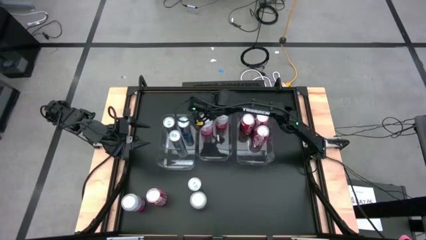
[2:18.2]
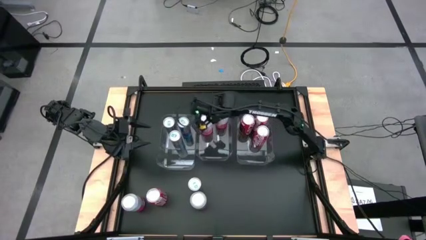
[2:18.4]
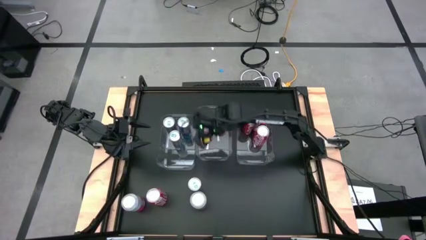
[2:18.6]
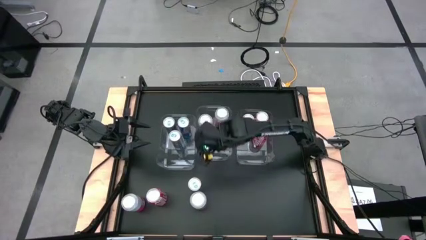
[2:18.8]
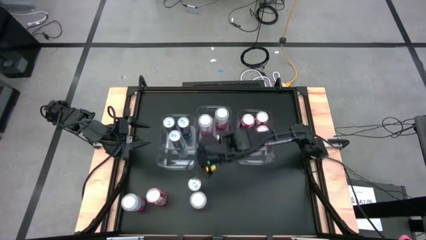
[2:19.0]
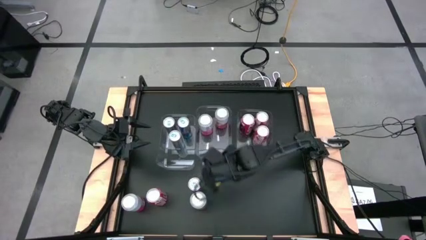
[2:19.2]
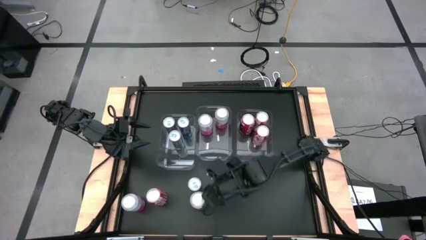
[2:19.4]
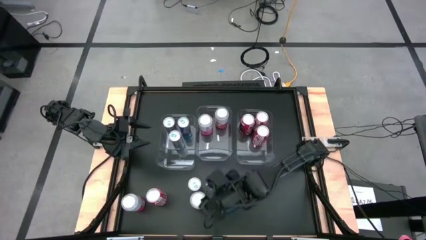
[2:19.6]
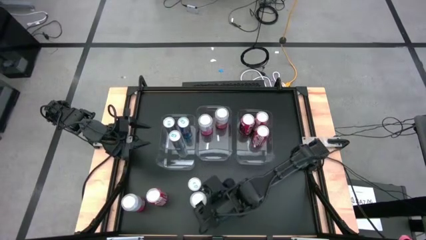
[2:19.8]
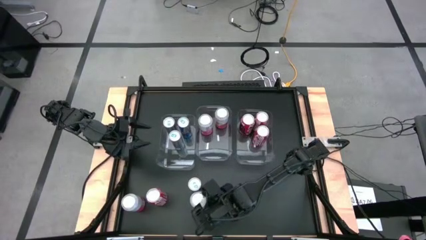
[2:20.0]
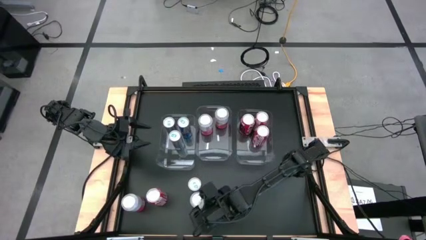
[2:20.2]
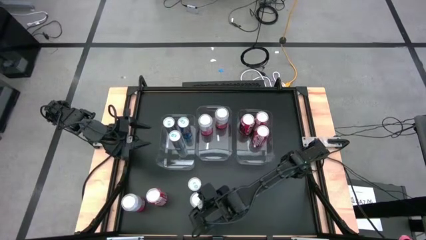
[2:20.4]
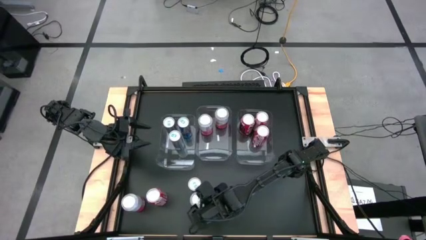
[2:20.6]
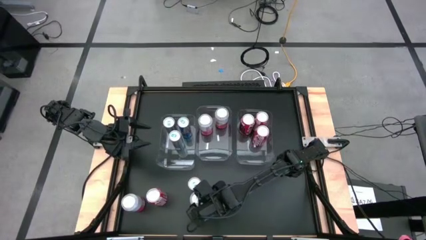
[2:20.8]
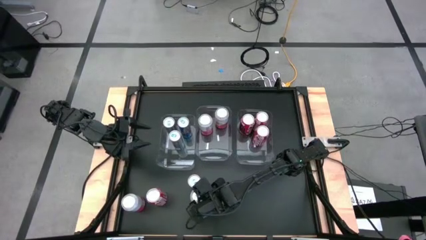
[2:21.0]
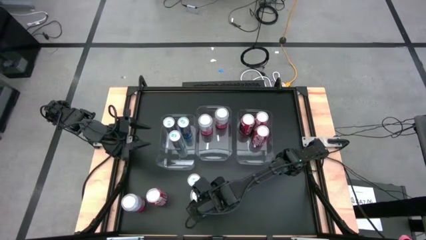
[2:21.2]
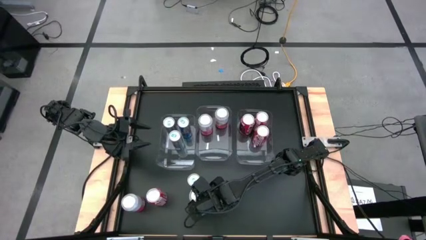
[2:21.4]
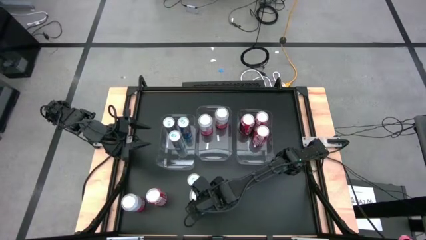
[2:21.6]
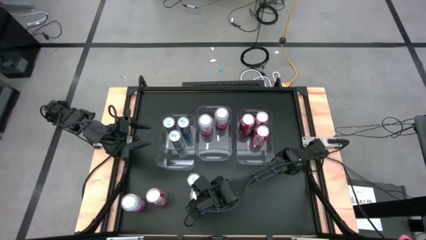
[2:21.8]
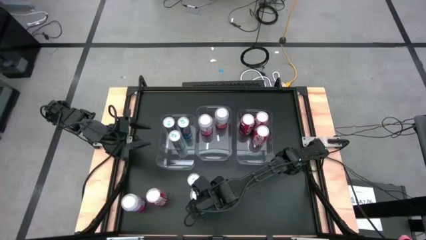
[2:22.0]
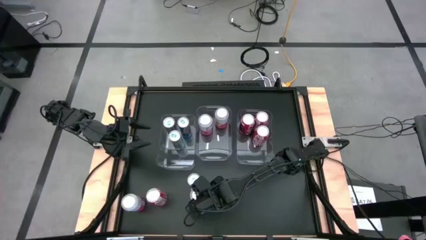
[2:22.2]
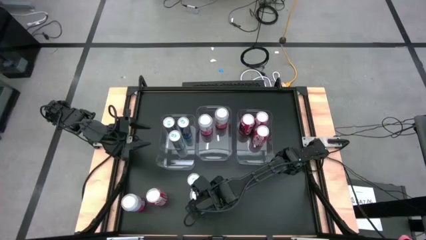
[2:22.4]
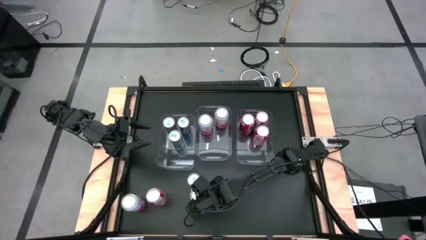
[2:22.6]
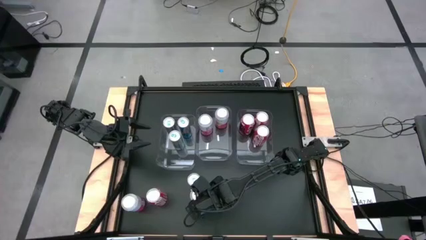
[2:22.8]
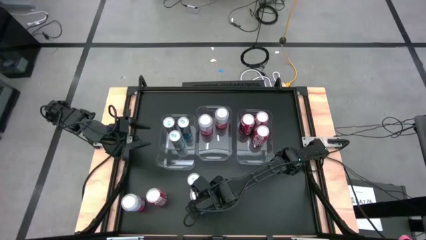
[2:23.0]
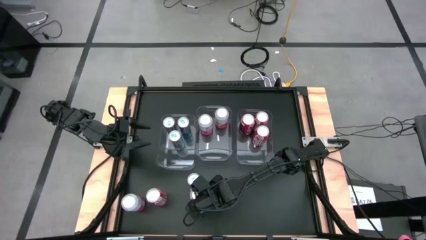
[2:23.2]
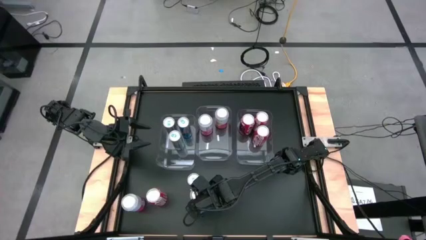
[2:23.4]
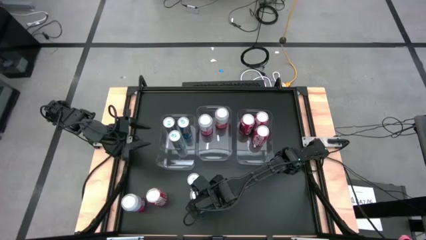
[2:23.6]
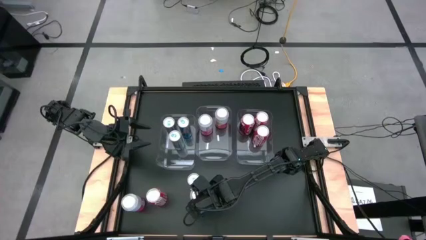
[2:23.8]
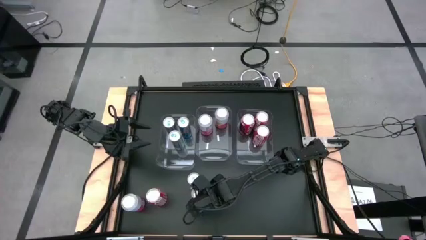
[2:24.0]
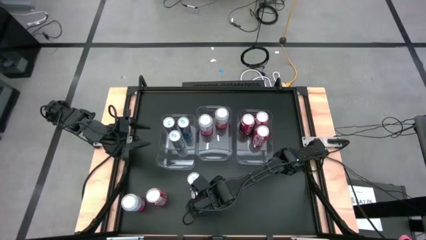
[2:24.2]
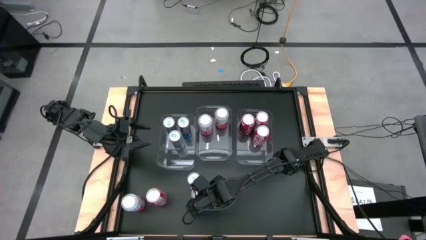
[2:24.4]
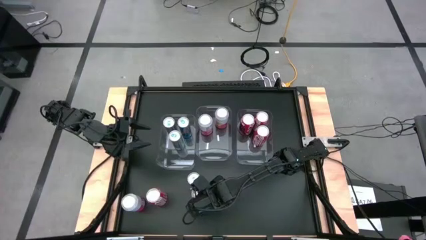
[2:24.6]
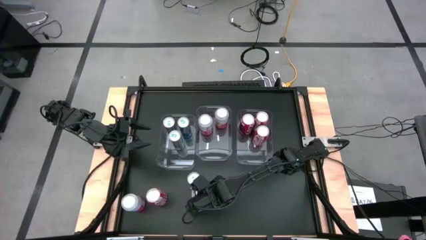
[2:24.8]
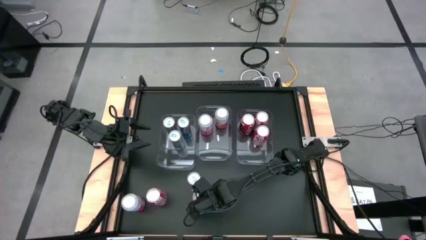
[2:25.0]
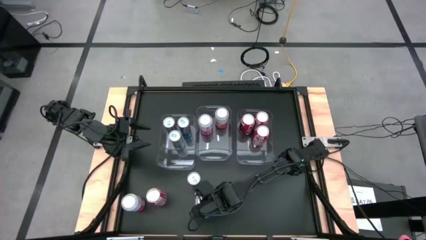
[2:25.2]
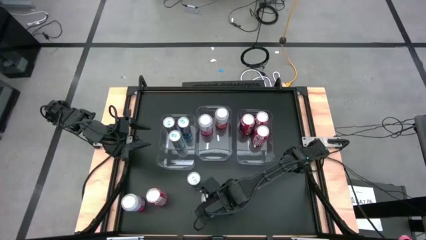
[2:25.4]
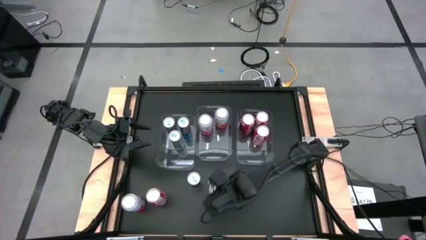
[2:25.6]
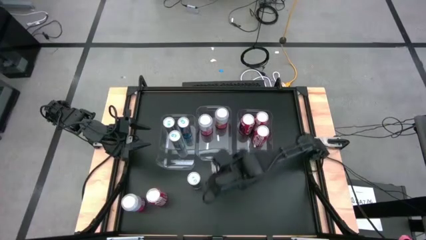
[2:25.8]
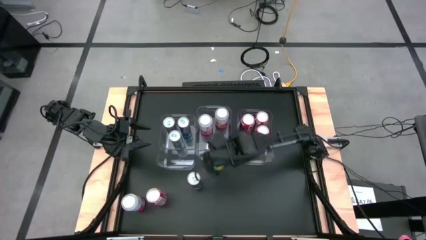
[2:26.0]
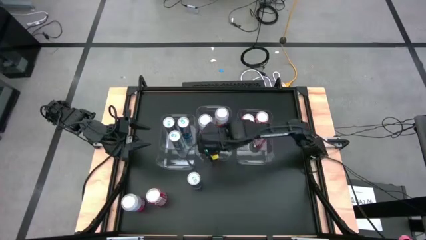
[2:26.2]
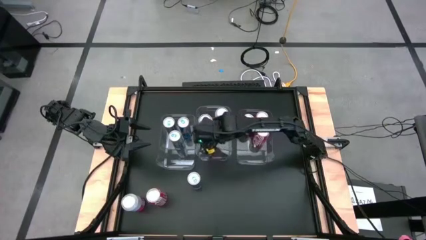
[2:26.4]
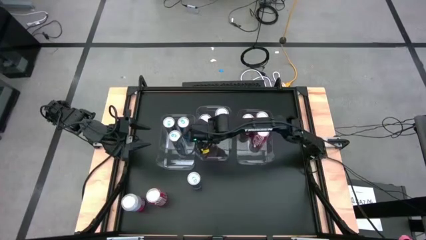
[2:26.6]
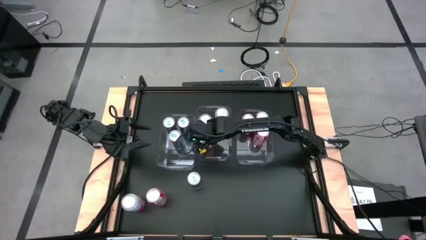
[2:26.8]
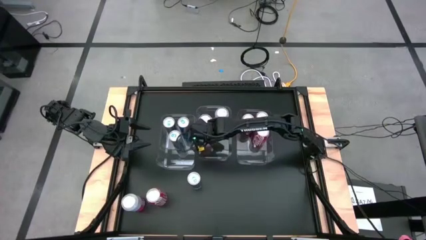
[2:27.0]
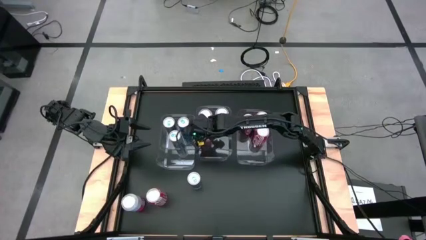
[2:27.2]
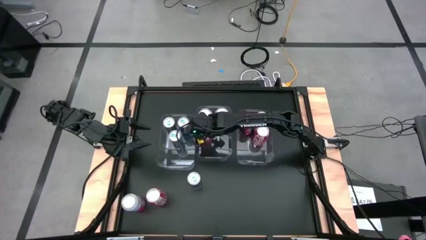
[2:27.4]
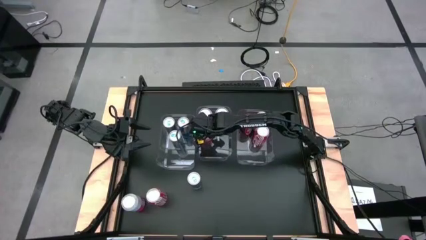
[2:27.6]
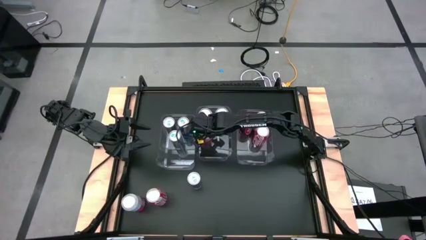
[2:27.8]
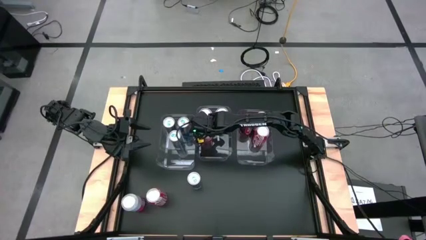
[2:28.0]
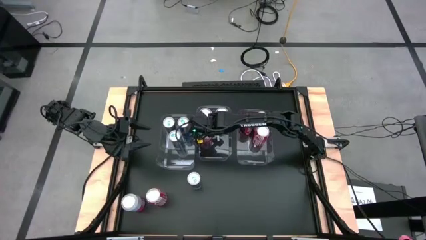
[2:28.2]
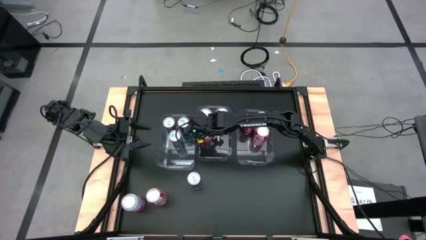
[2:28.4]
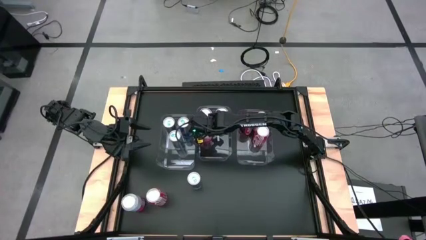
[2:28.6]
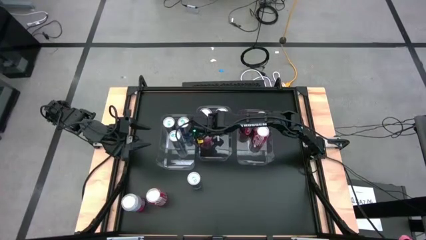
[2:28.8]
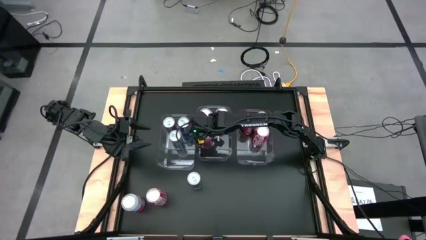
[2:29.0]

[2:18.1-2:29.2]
Task: Sort soda cans
Put the bottom center red and white soda can into the middle transparent bin

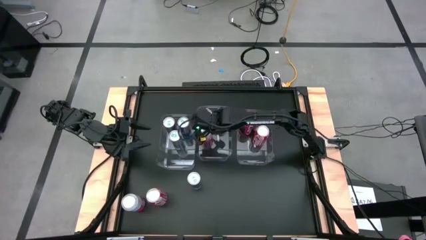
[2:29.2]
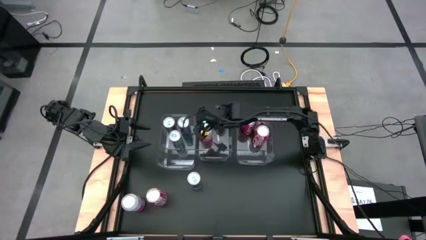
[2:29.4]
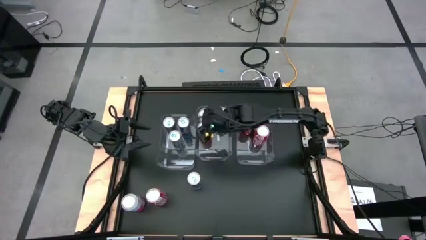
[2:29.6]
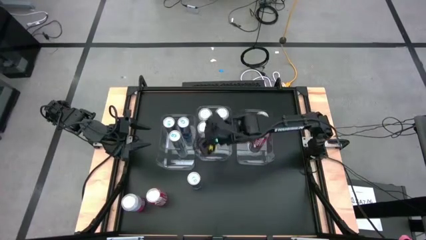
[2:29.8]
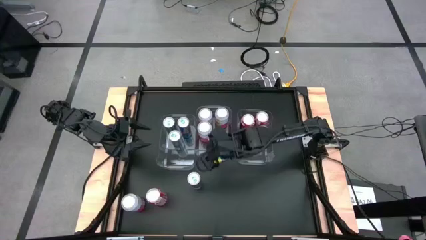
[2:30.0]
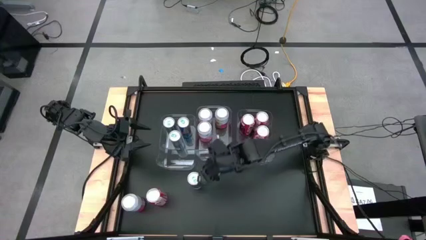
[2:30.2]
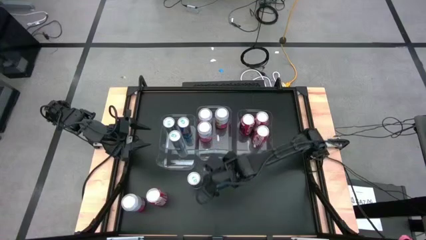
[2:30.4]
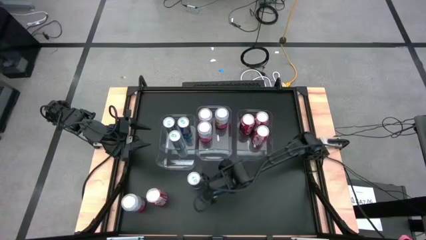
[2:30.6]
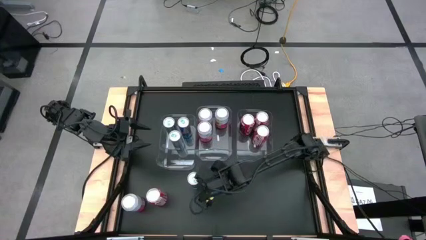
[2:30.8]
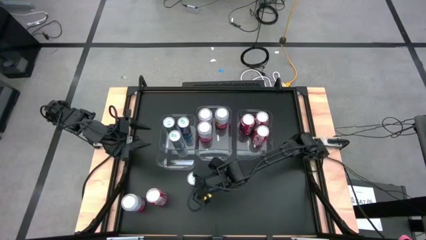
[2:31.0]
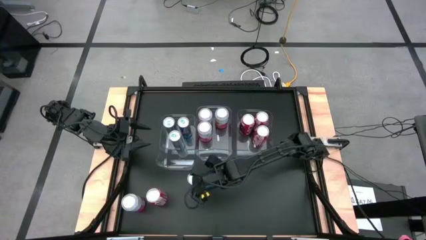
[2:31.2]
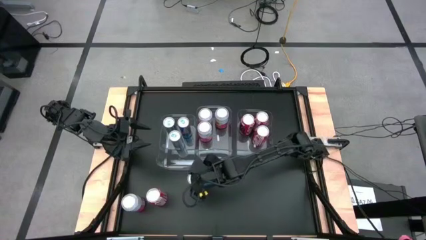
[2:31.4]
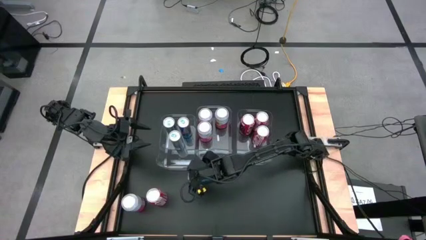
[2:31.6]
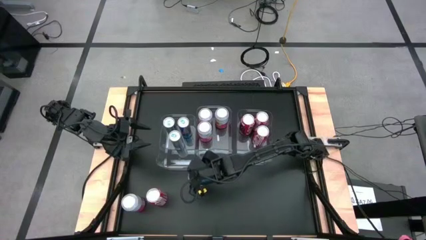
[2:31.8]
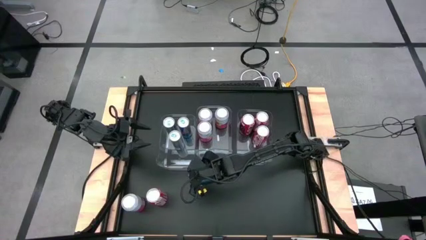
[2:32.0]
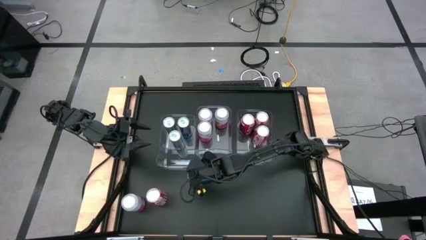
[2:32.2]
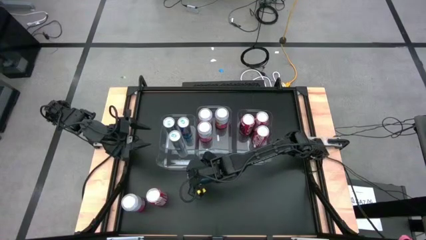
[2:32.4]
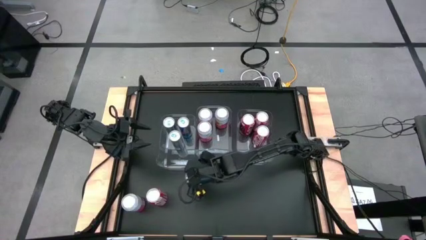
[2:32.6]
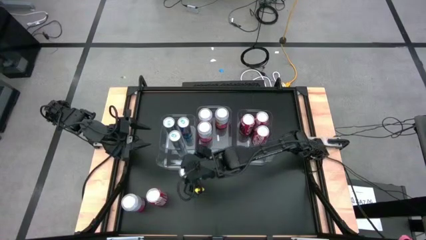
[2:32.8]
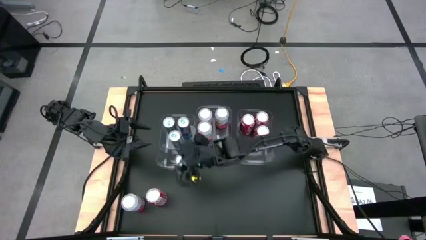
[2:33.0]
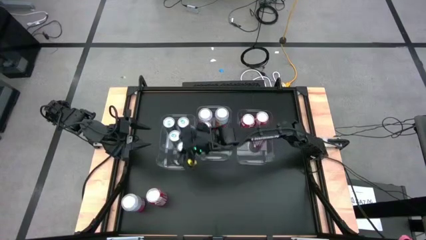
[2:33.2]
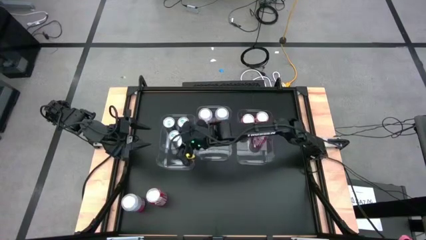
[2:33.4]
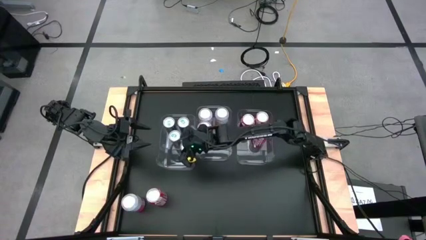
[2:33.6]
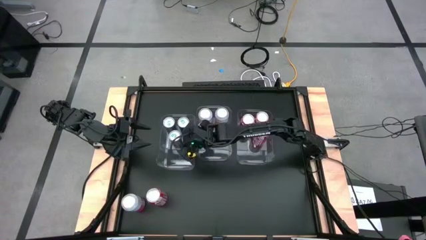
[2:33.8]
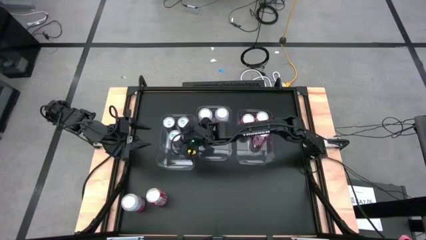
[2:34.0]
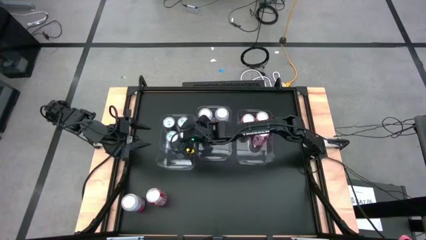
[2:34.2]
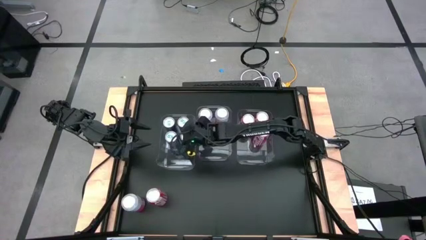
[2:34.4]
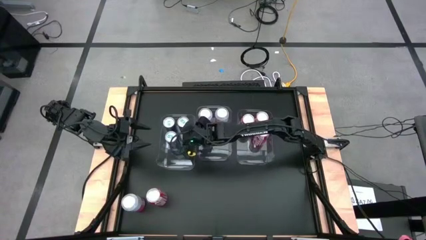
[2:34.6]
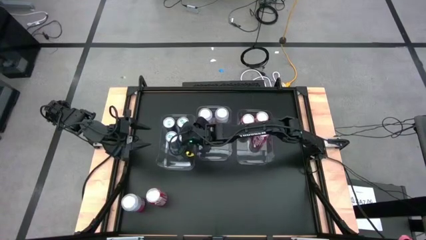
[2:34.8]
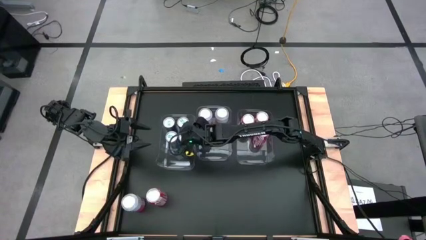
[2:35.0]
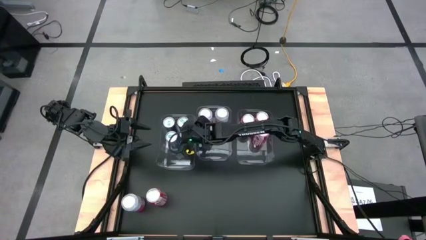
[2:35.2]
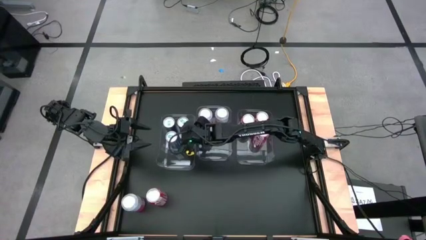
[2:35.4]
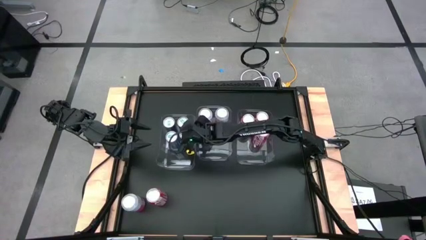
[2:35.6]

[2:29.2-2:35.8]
Put the bottom center blue soda can into the left transparent bin
